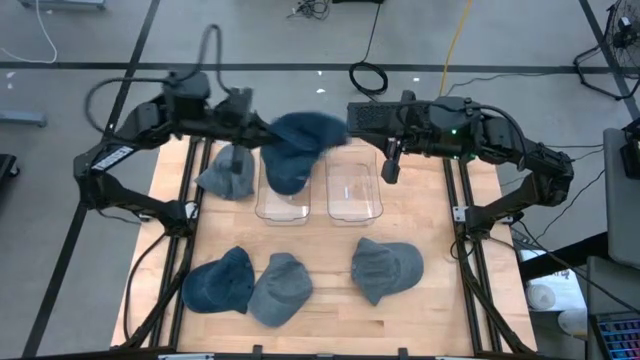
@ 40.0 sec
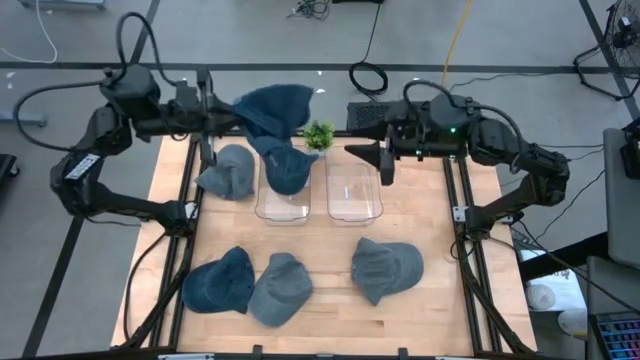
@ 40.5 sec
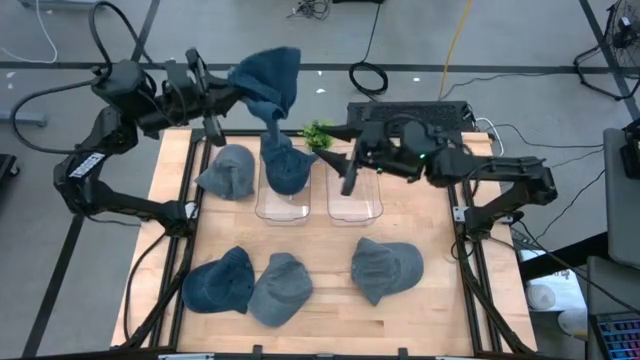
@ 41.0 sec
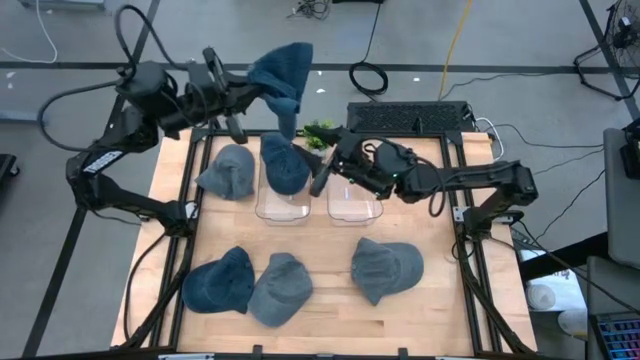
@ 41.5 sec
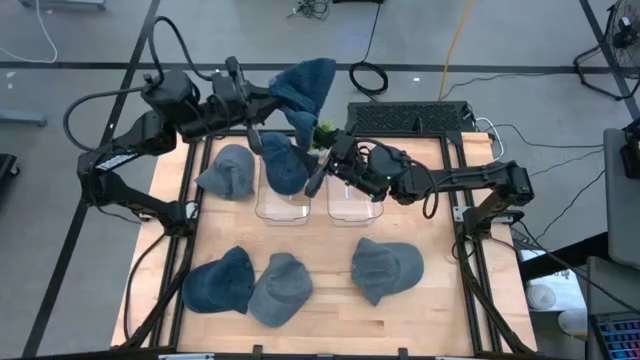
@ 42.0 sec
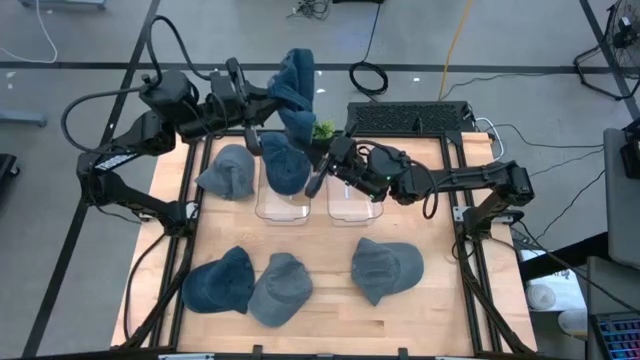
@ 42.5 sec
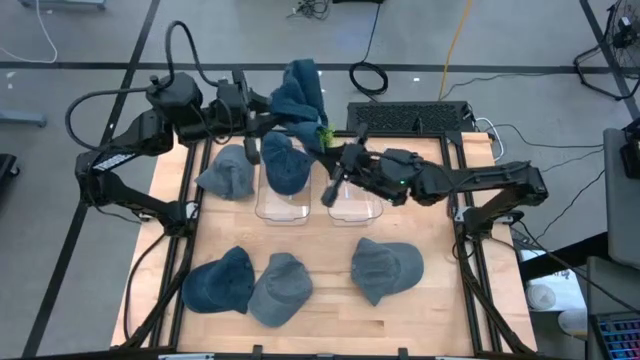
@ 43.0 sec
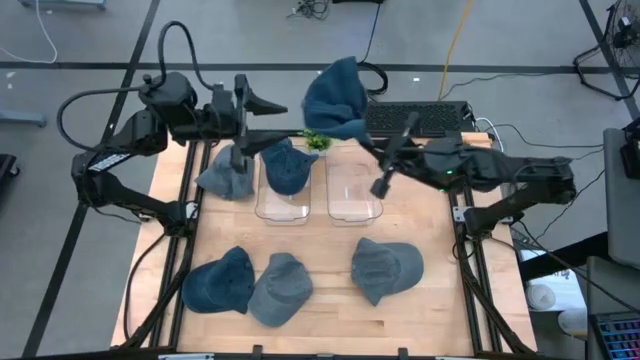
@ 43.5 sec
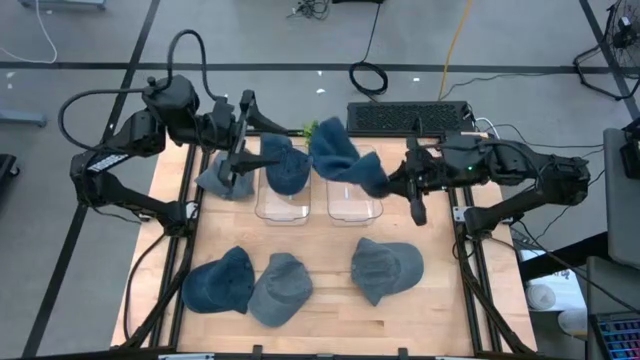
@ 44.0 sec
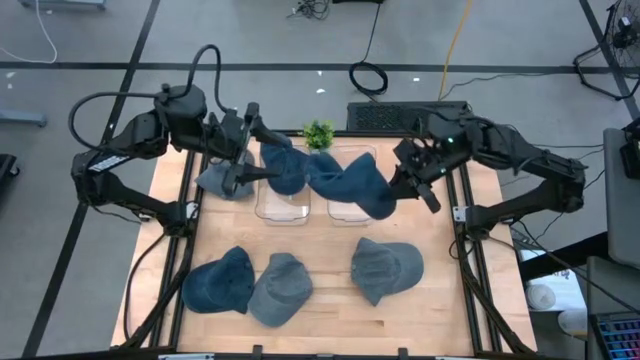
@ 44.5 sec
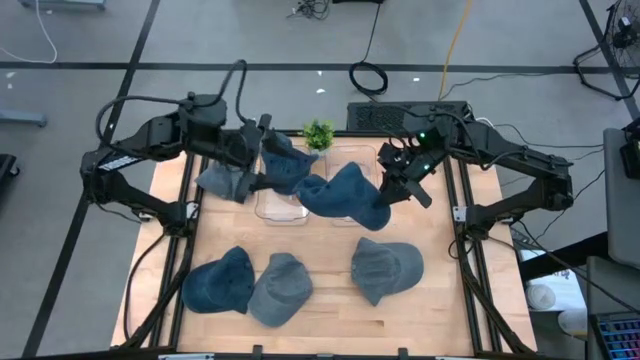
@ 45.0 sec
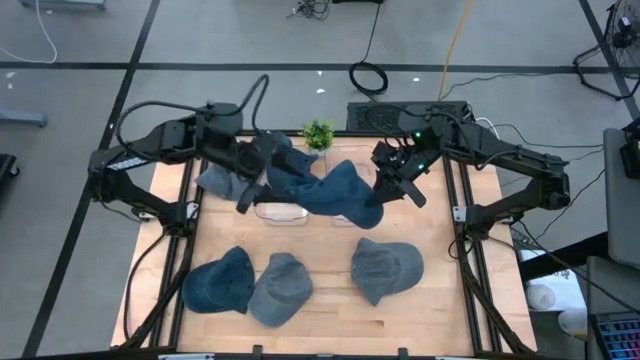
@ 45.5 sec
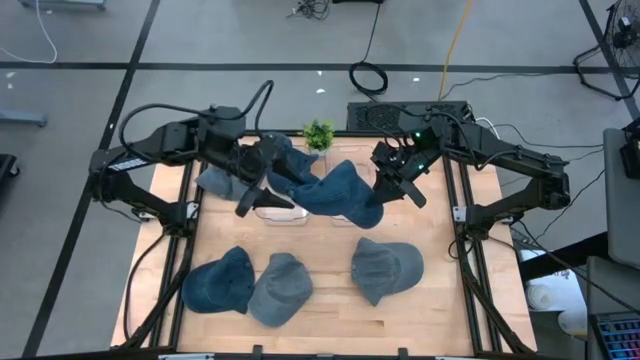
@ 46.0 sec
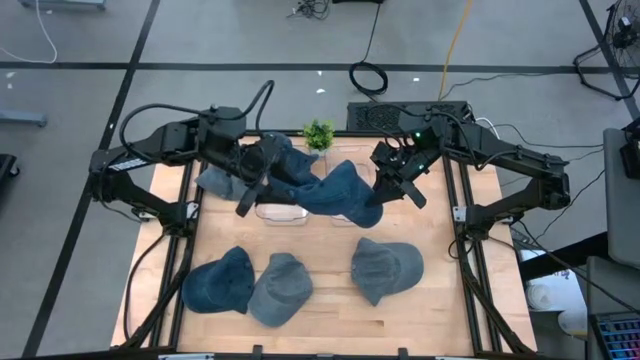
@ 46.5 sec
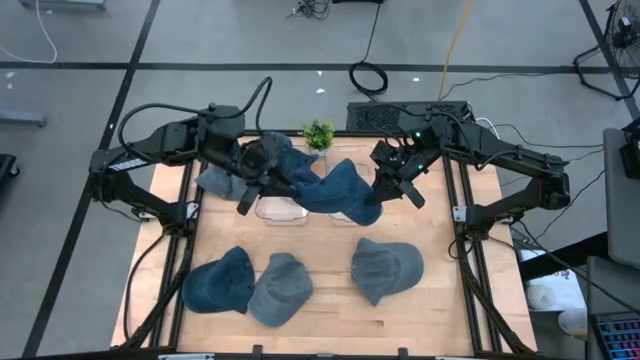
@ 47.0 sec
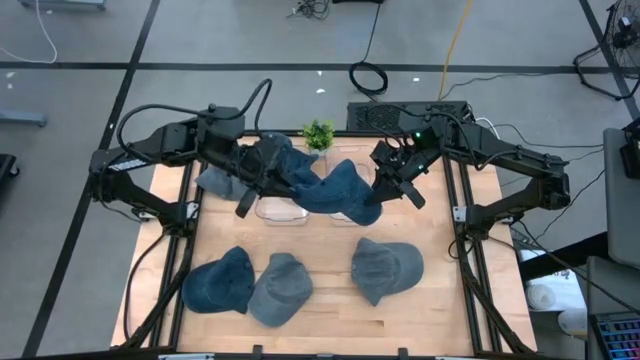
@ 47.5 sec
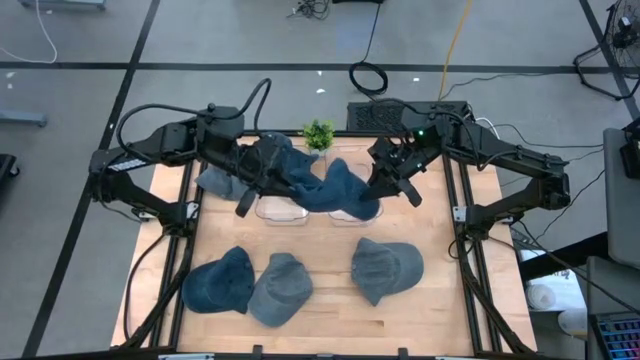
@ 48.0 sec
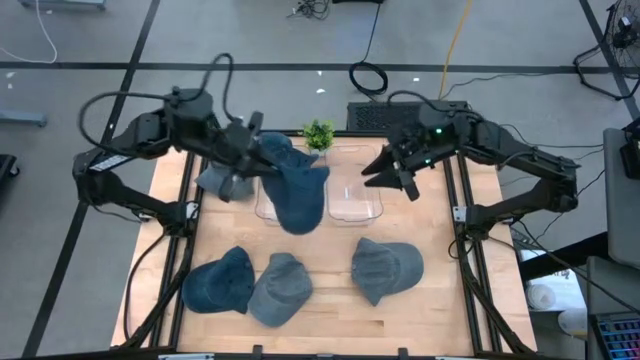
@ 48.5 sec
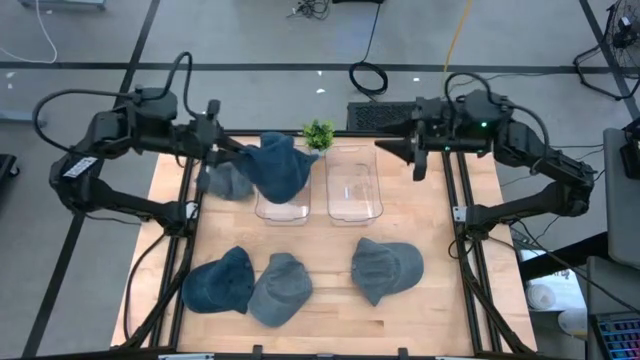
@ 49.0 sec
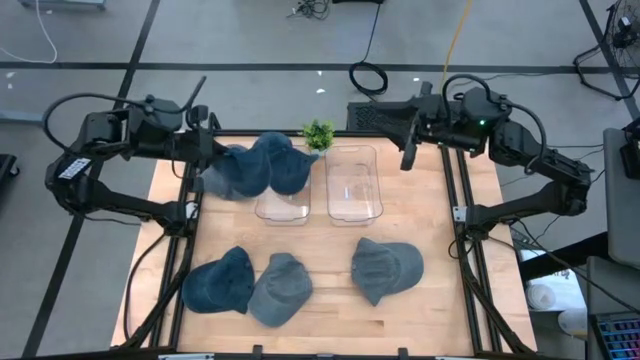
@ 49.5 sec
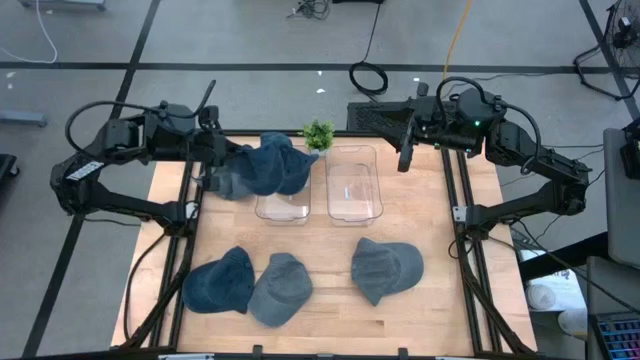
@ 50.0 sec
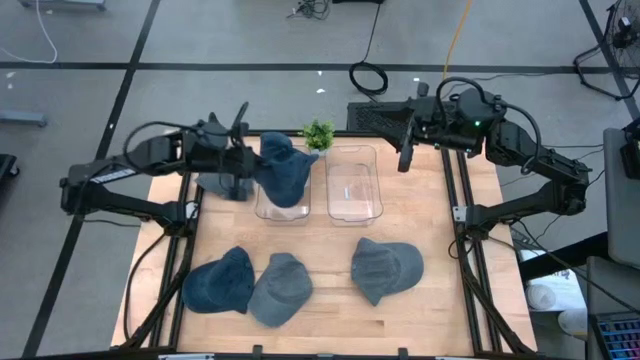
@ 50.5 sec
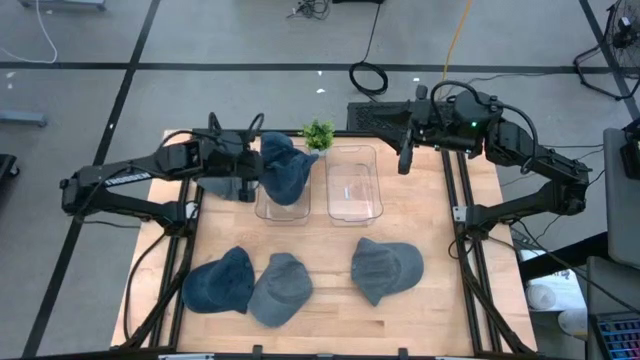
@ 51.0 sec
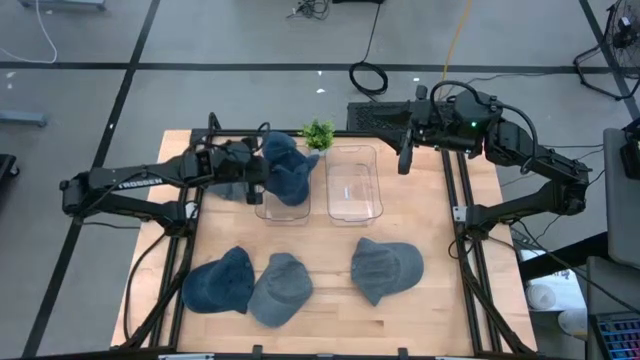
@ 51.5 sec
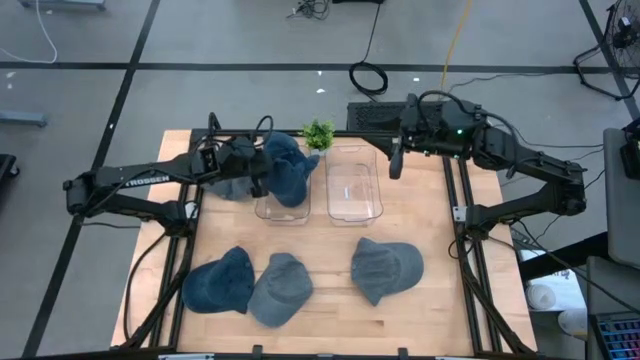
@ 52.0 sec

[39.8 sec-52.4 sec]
Task: Pick & Place hat
Put the right blue cap into the left transparent bin

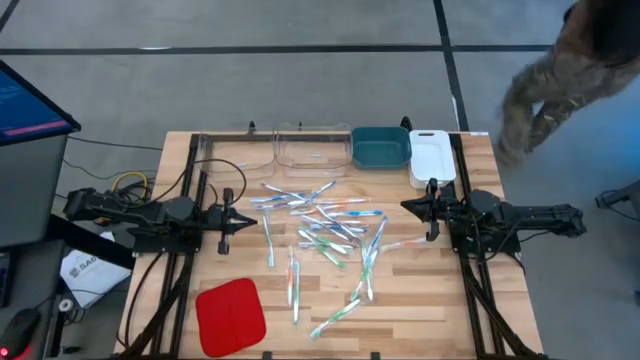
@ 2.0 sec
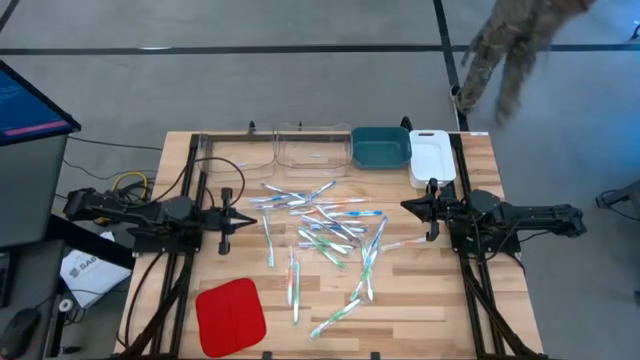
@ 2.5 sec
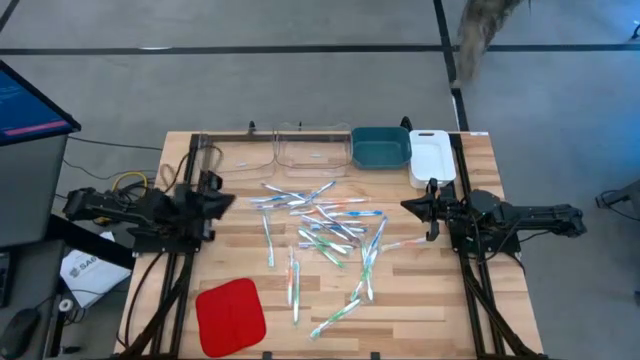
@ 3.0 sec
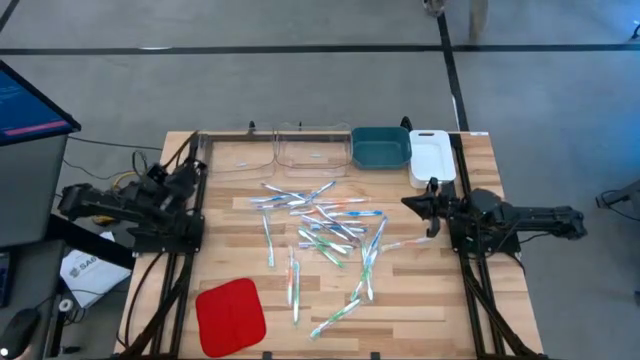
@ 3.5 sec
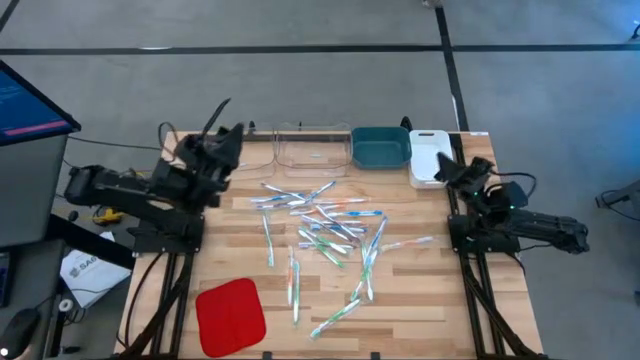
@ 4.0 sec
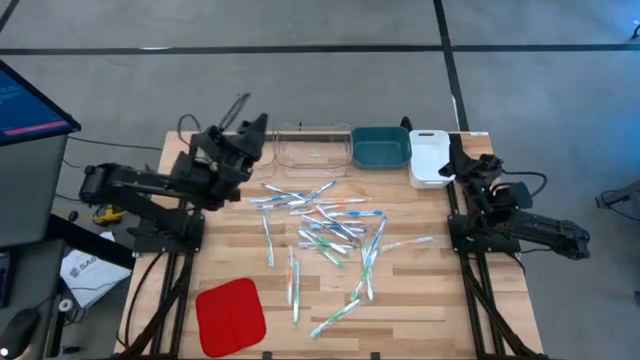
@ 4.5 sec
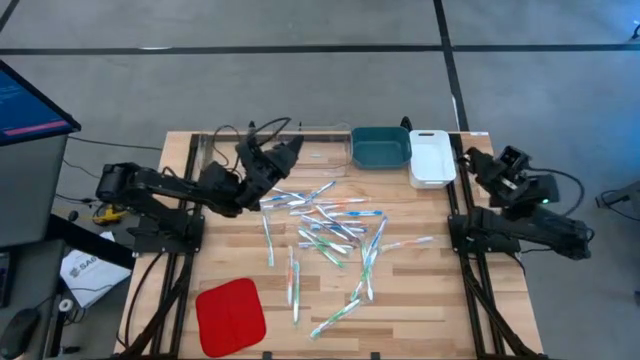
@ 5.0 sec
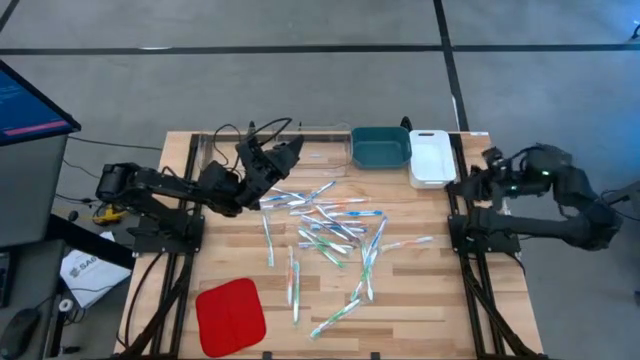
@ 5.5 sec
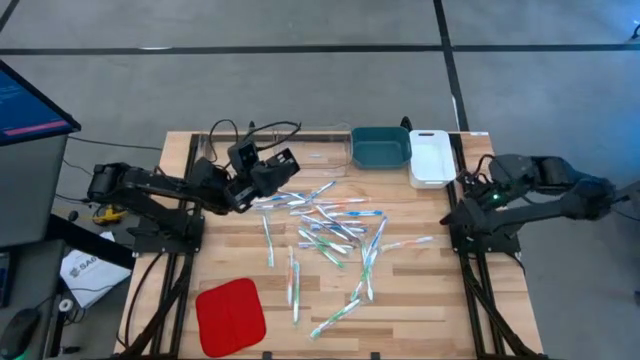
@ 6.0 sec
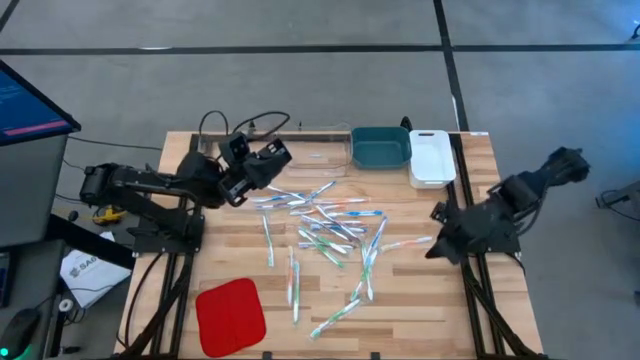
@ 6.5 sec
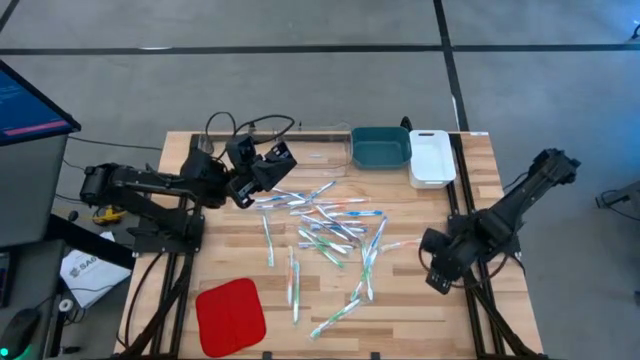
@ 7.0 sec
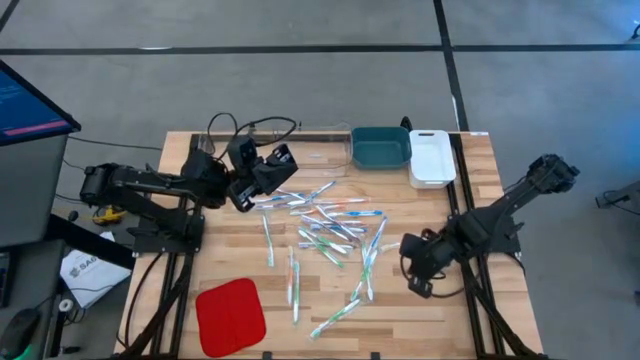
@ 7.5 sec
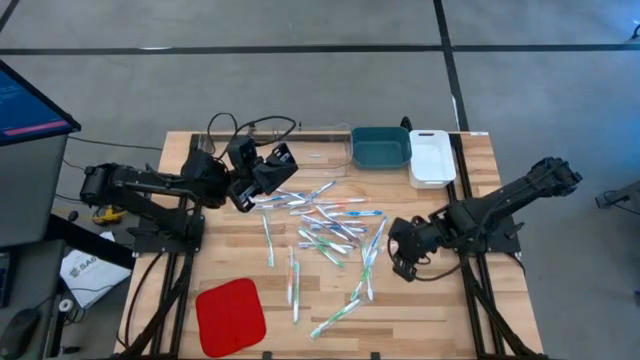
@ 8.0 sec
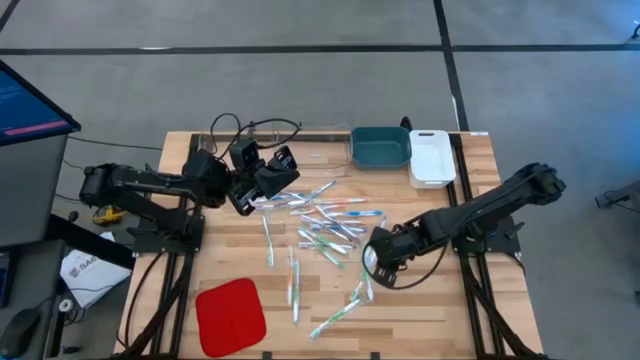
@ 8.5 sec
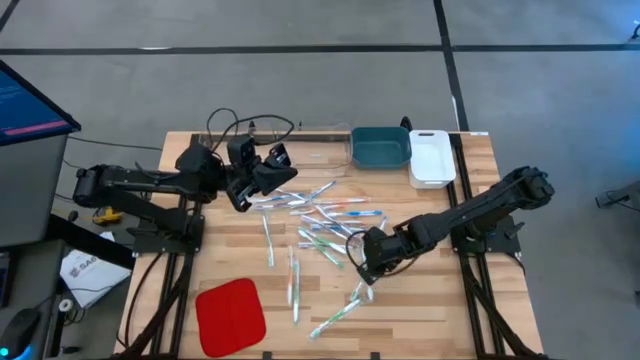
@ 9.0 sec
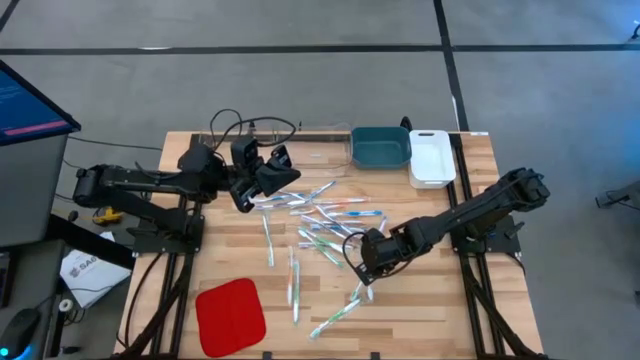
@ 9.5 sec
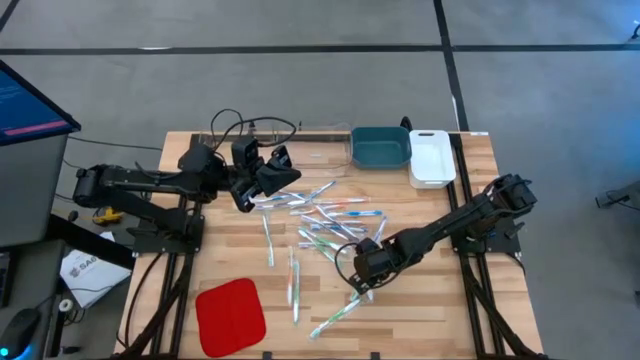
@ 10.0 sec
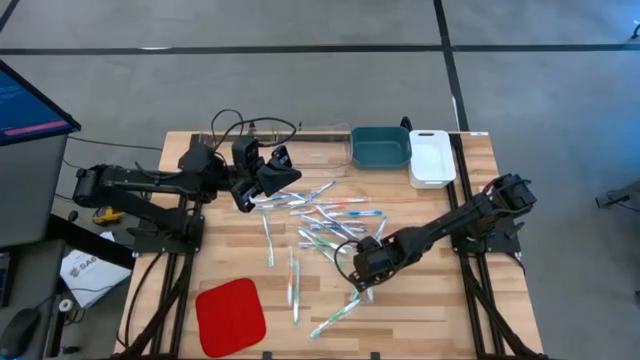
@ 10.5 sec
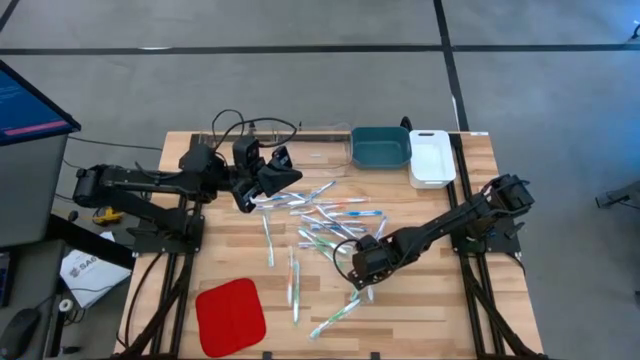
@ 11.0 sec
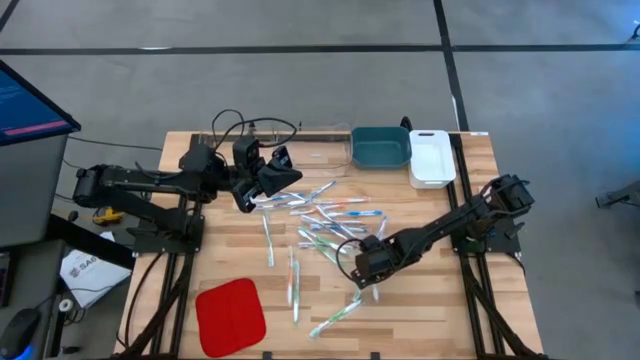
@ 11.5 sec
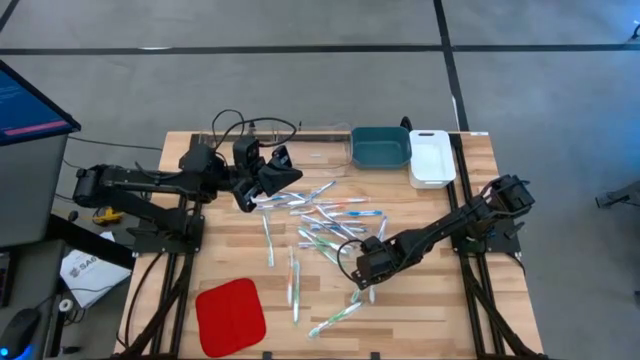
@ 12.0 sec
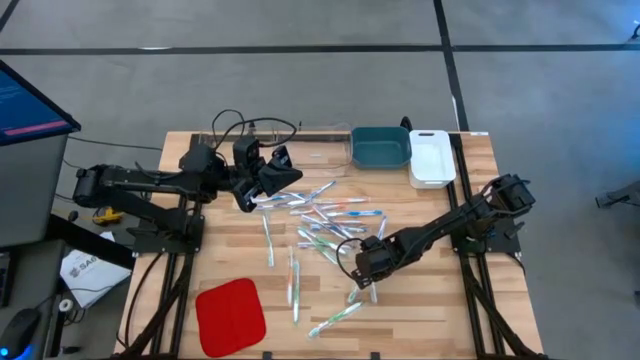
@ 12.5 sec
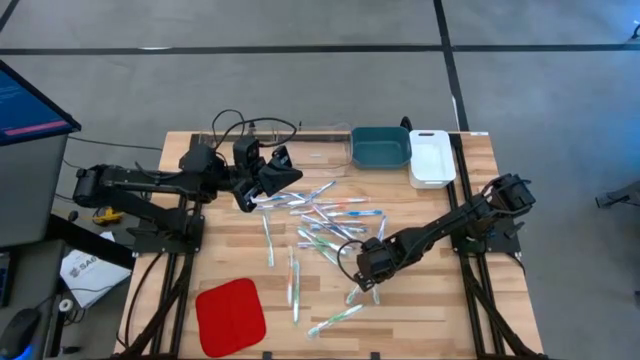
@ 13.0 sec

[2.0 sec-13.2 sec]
Task: Pick & Place Toothbrushes
Put the green toothbrush into the white bin
